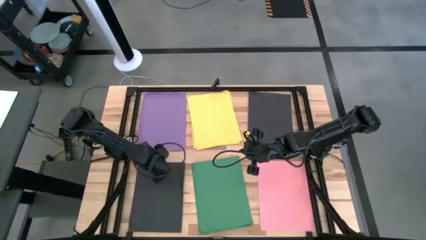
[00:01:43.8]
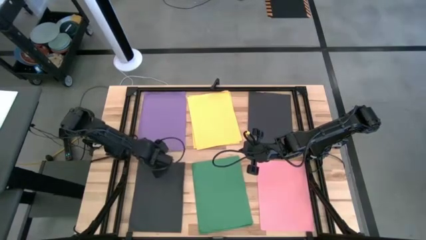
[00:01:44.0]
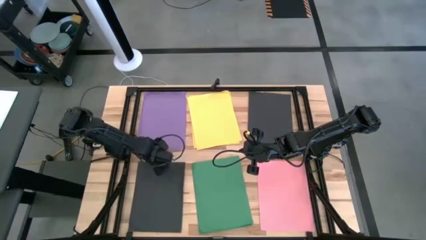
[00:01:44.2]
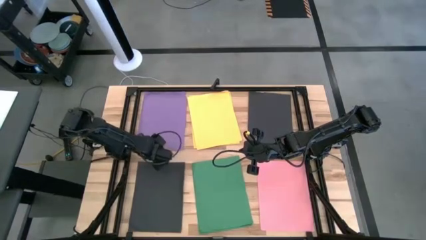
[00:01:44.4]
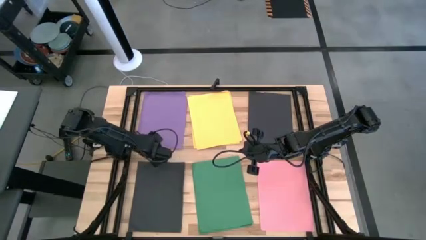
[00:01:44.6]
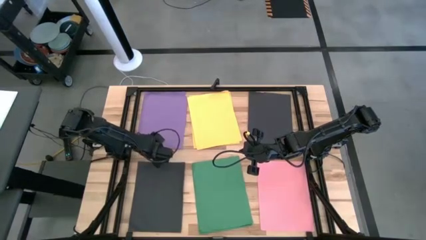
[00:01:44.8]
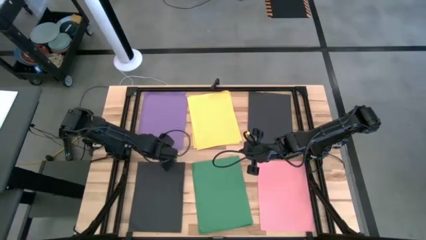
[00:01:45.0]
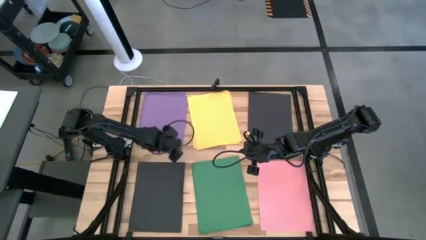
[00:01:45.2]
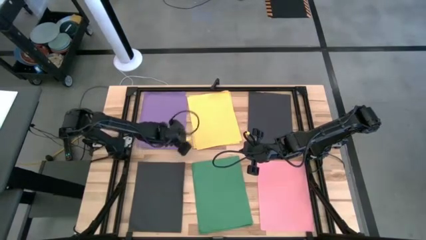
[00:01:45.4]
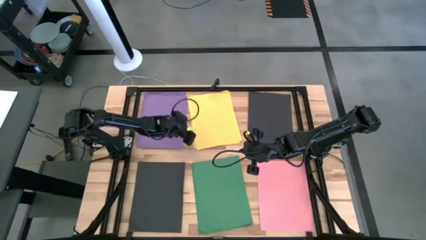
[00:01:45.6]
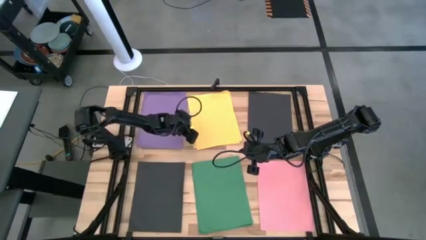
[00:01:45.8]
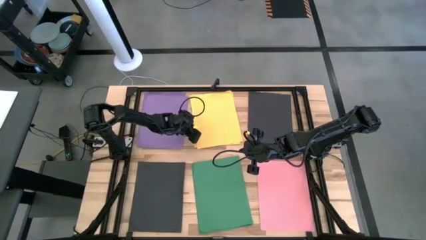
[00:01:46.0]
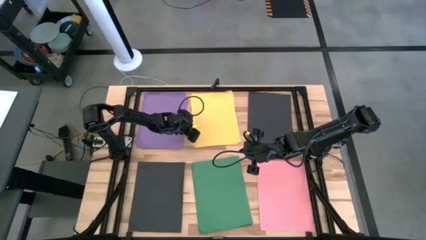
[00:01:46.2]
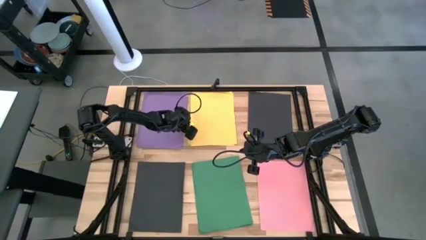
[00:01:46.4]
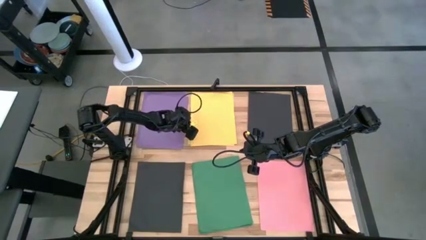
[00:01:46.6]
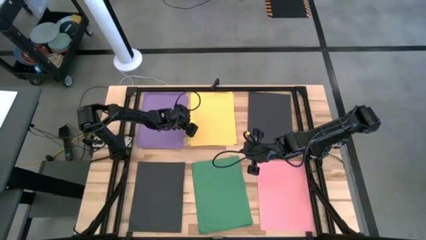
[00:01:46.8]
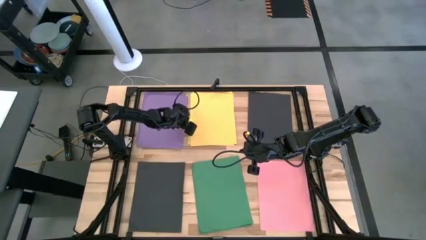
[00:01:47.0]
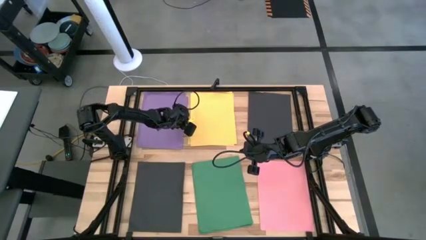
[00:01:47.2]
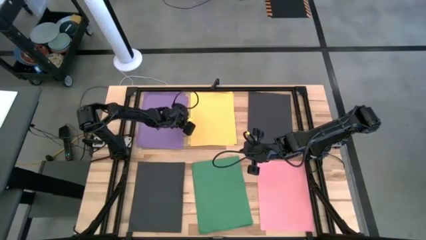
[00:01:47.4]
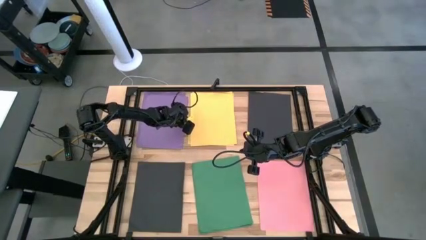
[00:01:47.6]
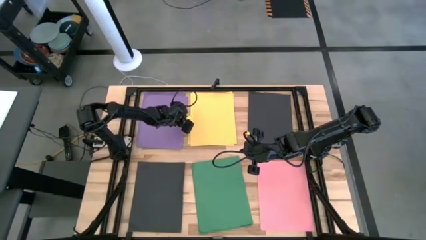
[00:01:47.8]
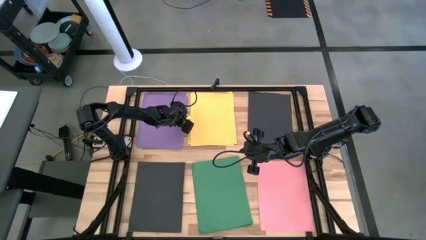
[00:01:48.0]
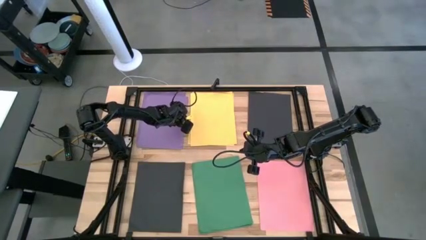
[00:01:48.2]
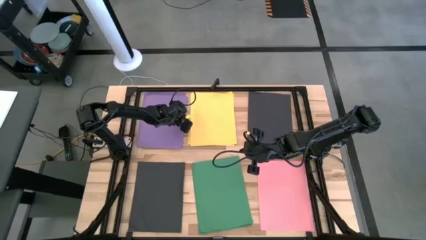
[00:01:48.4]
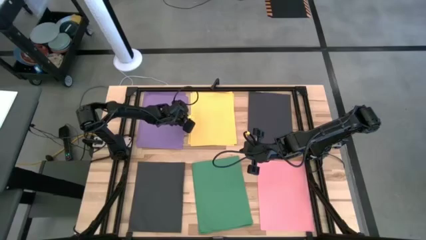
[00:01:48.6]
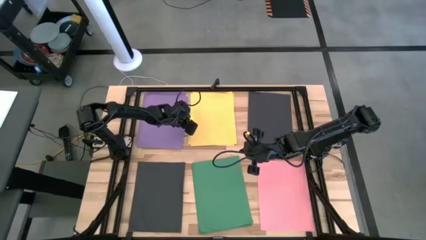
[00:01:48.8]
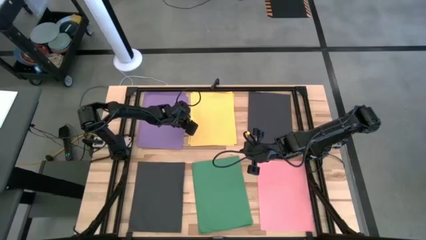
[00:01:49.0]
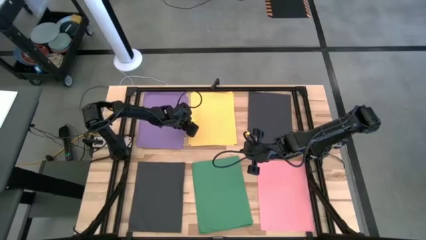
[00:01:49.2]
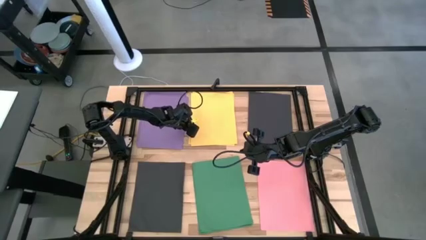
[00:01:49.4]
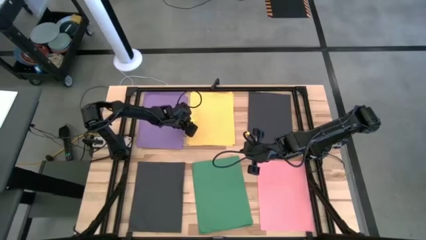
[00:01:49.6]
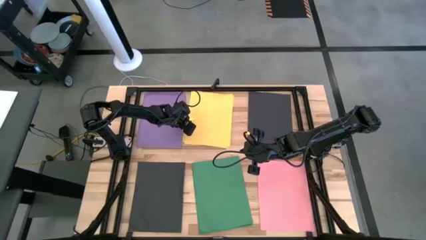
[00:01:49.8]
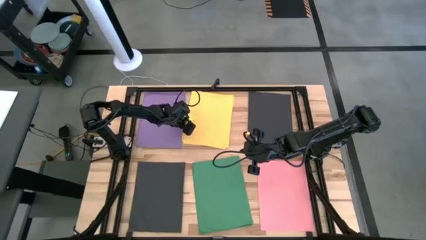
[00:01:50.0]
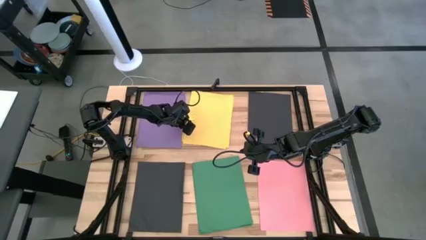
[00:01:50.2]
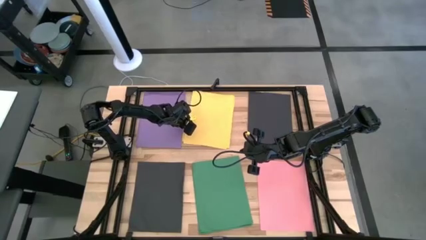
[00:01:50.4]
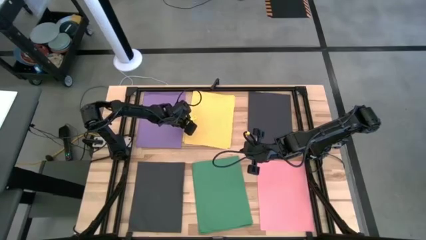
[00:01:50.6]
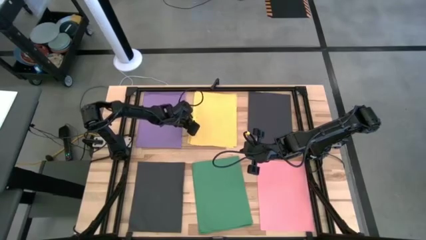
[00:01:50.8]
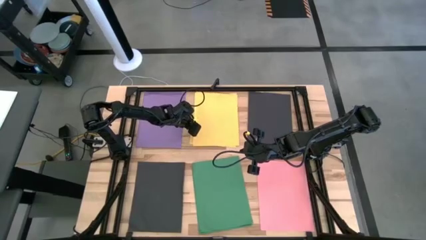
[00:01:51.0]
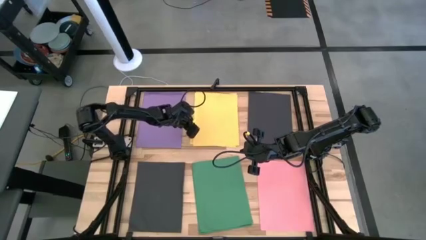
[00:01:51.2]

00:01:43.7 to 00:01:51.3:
Task: Organize paper
Adjust the yellow paper

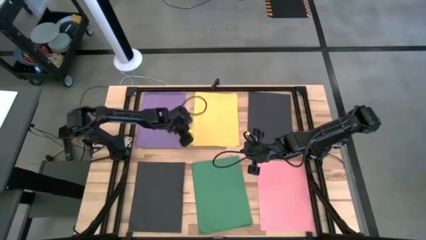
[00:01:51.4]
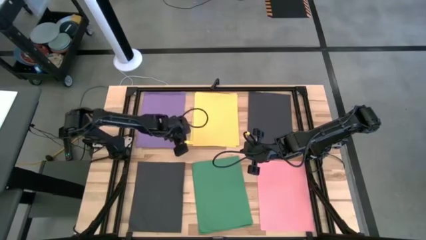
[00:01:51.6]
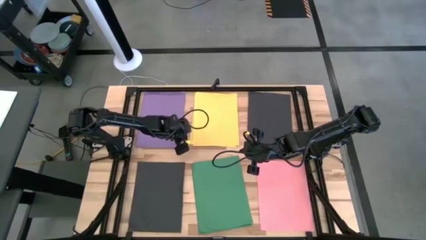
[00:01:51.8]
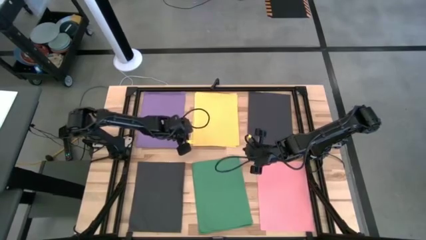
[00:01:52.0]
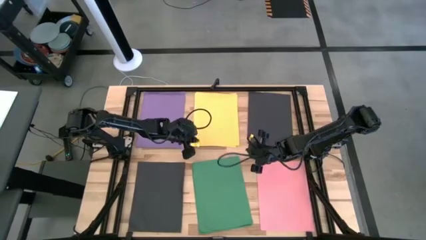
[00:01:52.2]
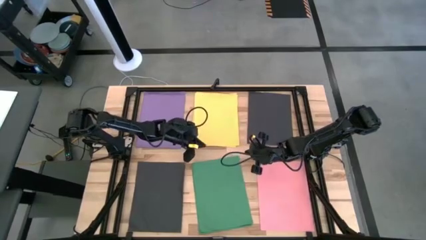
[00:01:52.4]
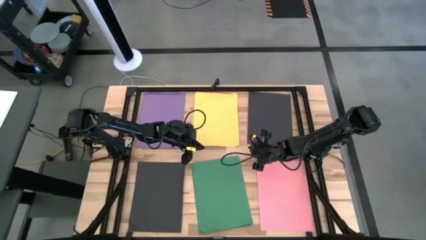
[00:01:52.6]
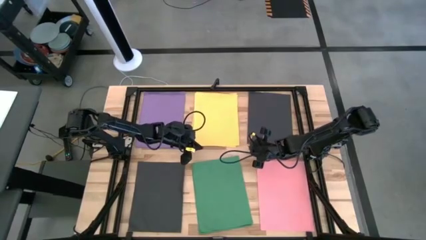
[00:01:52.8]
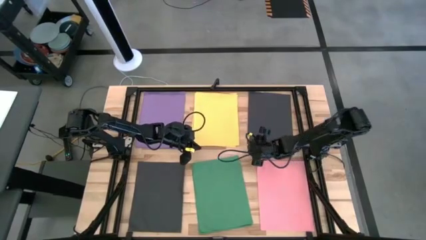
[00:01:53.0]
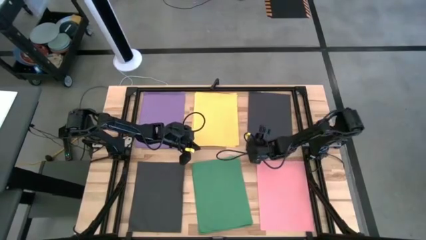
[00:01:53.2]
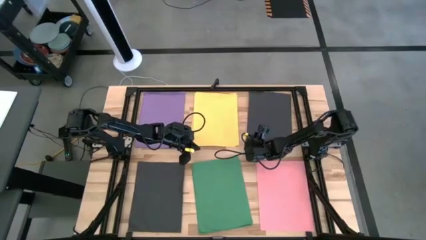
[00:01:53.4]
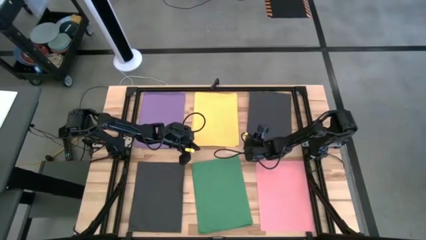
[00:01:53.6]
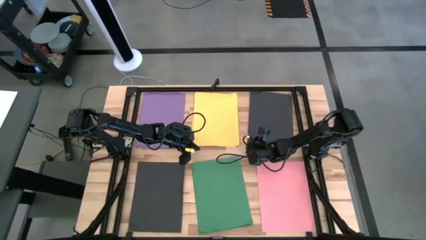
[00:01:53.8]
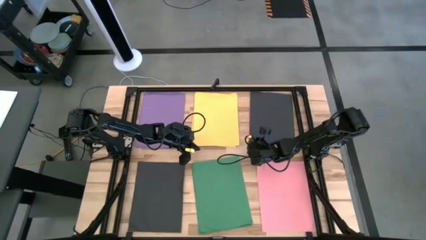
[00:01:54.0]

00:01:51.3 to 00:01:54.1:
Stack the black paper on top of the black paper

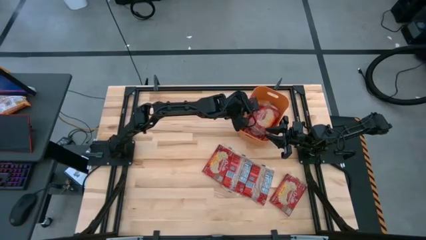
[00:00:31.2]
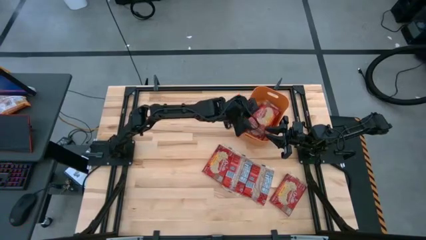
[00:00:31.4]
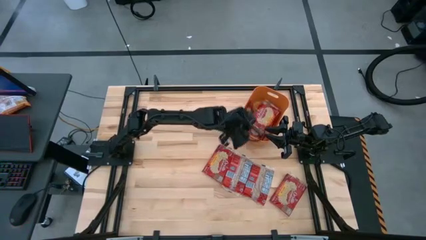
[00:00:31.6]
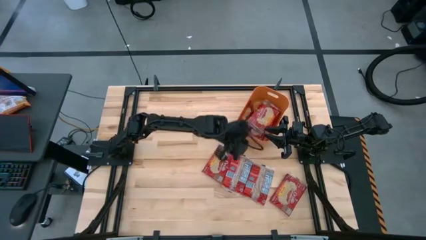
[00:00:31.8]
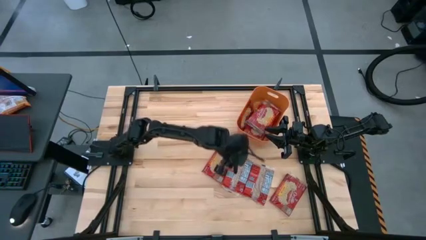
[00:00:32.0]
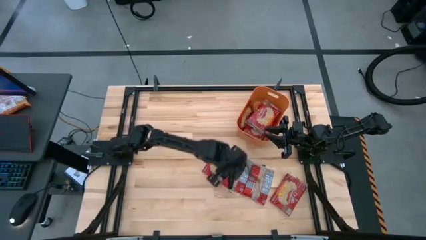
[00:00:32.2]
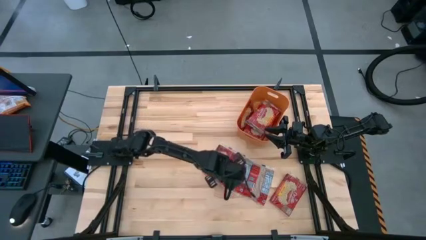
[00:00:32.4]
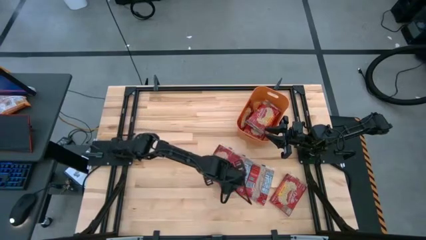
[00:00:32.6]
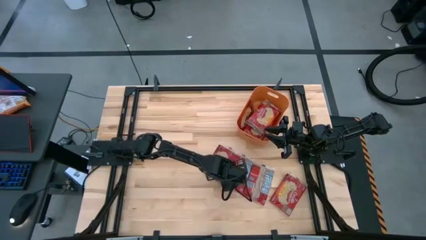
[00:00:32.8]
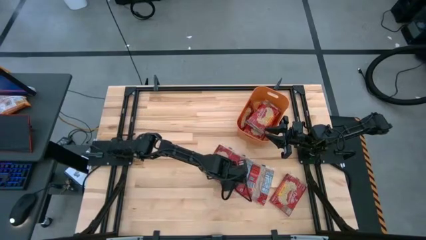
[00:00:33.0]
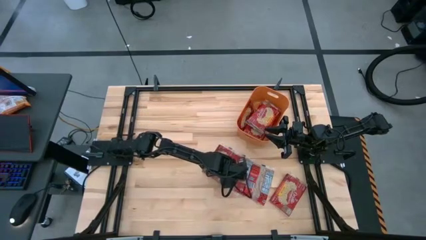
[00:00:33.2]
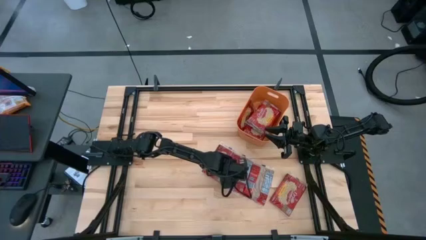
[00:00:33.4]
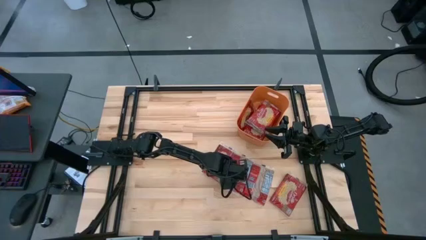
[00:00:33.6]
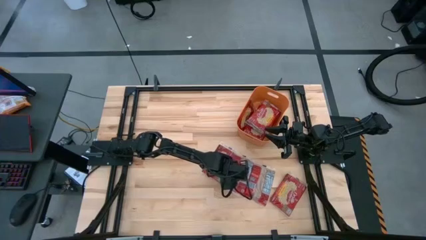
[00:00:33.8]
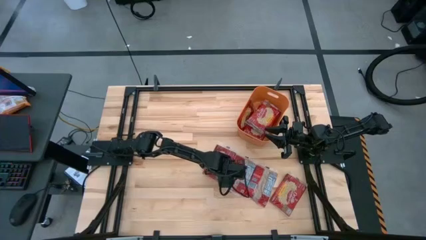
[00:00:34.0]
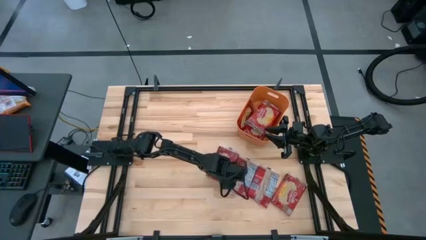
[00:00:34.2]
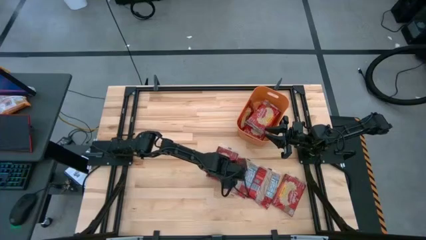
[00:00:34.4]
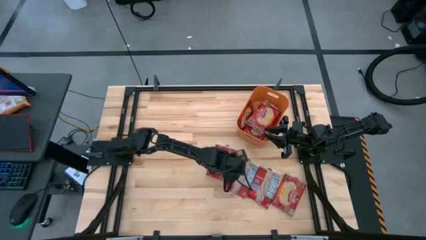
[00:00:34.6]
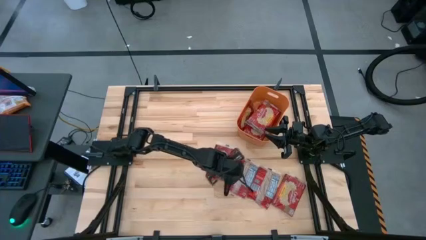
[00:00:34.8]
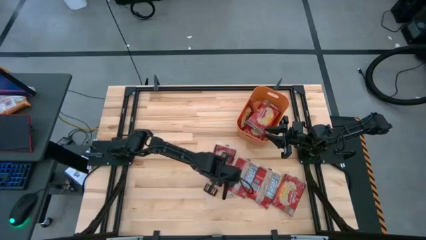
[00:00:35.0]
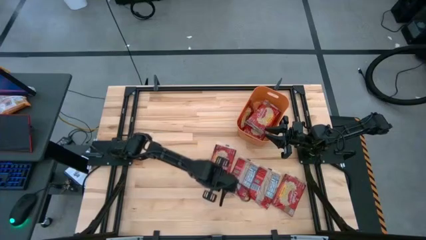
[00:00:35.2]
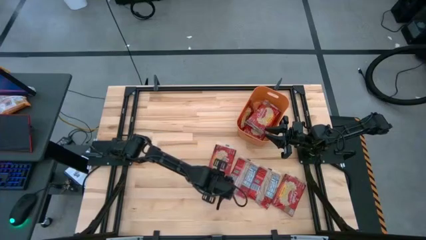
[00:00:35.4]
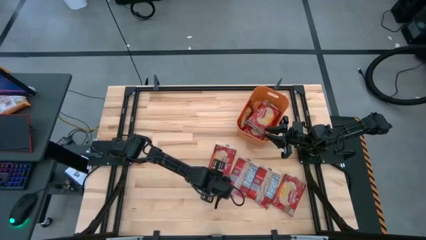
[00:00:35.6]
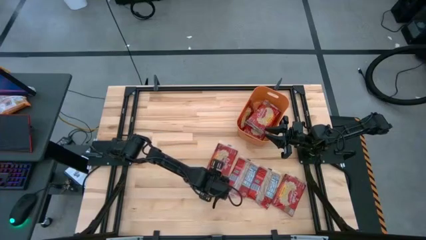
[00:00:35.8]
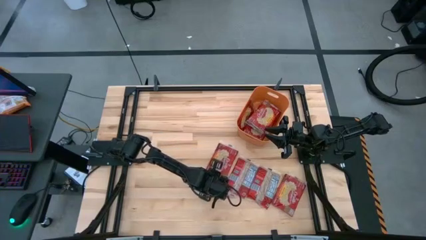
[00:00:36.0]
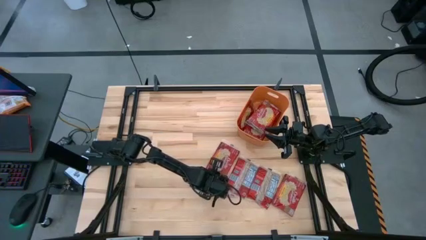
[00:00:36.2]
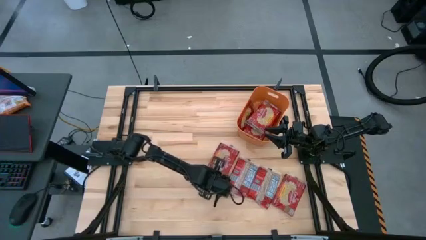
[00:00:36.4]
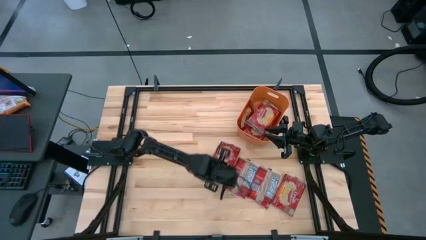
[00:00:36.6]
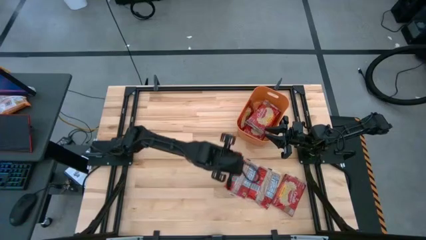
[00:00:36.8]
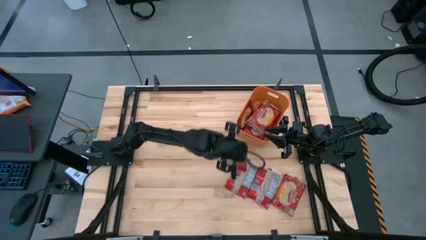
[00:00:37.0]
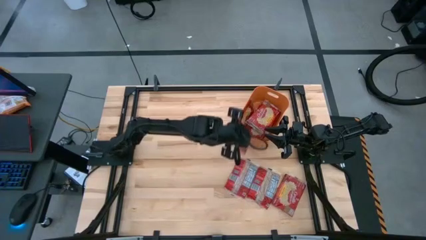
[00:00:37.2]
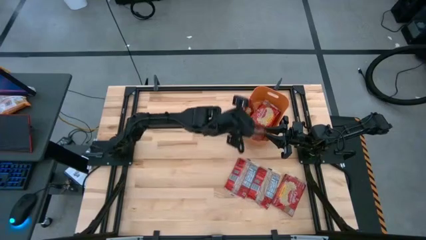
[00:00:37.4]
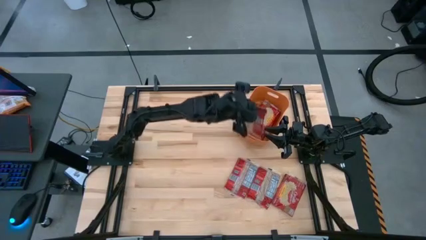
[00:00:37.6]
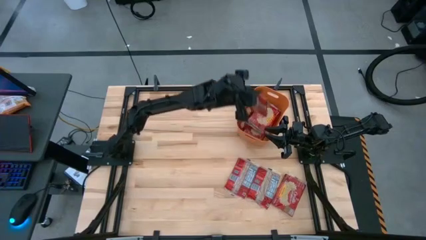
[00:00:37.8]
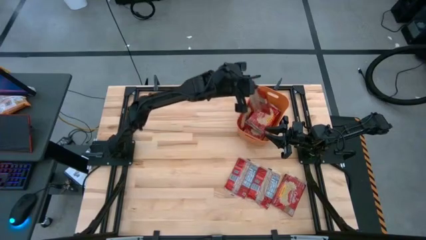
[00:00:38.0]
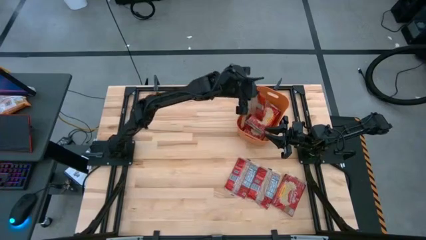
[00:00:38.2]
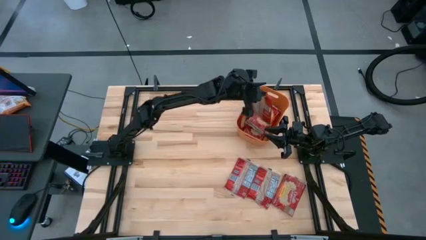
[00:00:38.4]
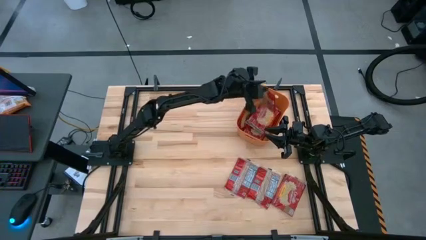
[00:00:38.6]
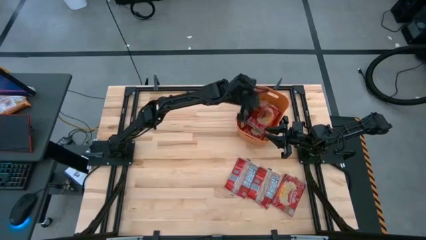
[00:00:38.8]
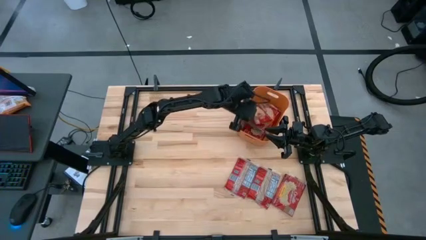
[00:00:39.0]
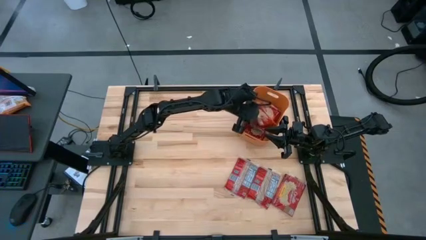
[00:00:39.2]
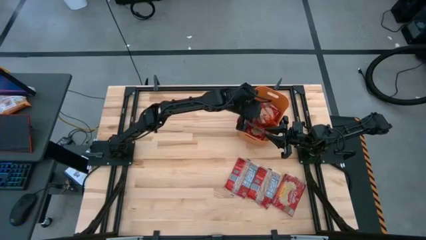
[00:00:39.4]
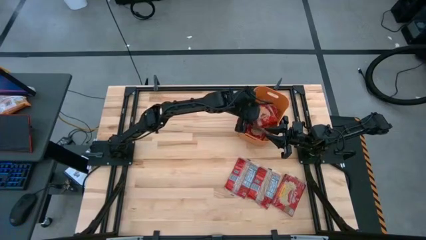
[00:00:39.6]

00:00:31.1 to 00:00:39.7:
Task: Sort popcorn bags into baskets
Put the red popcorn bag into the orange bin
